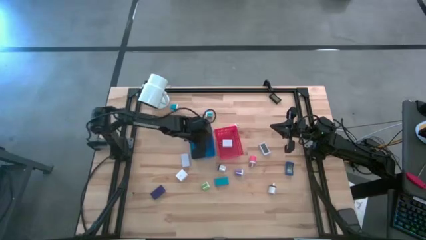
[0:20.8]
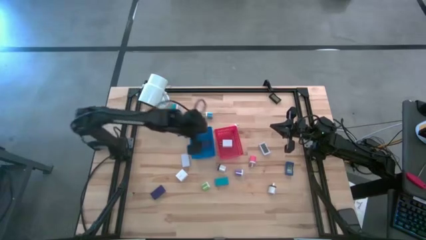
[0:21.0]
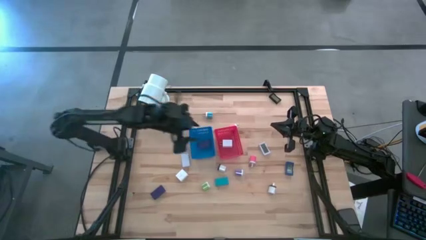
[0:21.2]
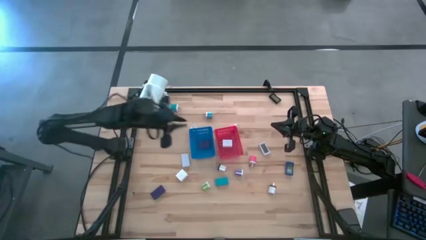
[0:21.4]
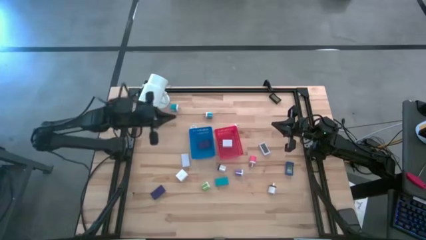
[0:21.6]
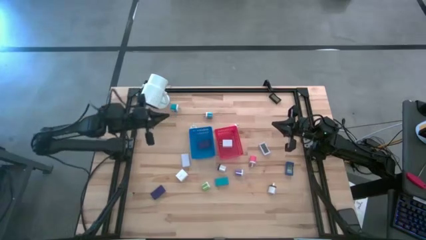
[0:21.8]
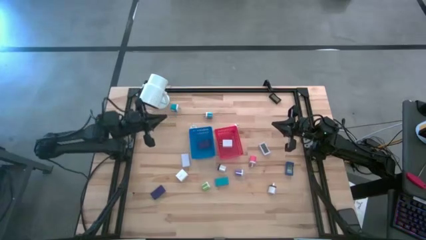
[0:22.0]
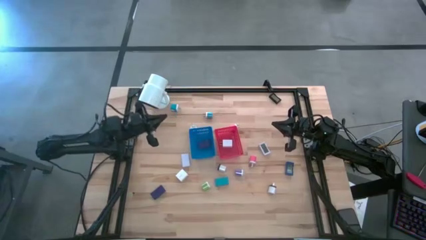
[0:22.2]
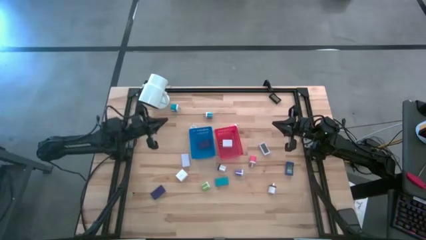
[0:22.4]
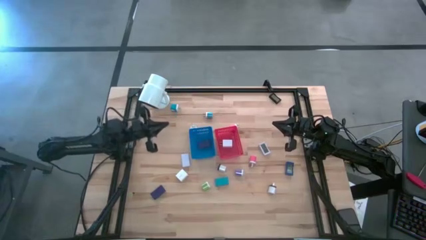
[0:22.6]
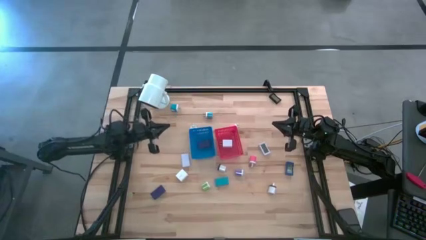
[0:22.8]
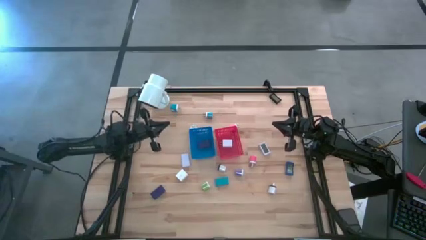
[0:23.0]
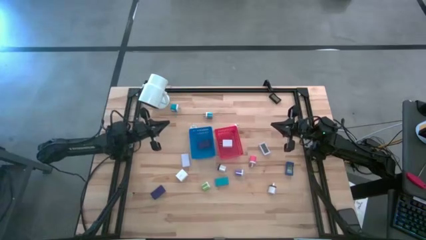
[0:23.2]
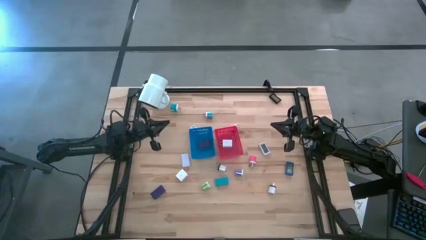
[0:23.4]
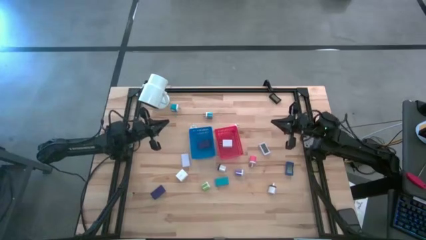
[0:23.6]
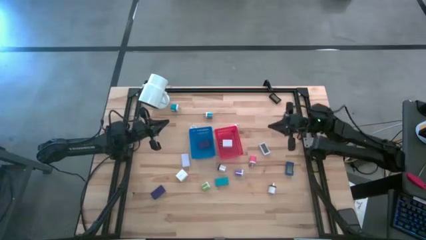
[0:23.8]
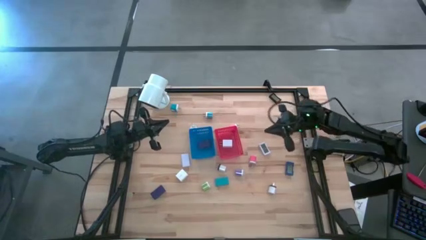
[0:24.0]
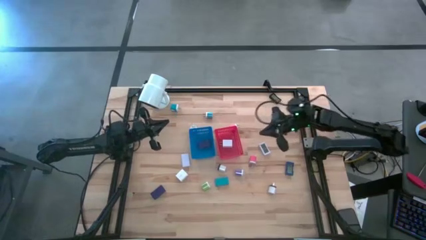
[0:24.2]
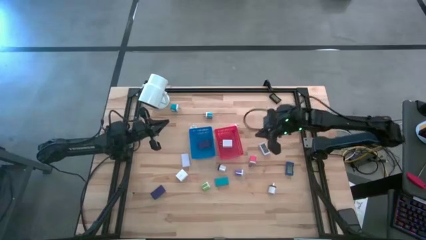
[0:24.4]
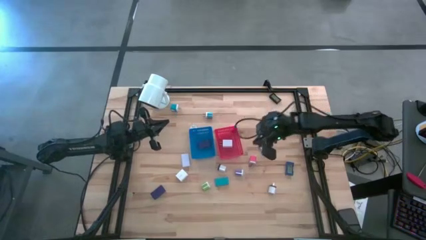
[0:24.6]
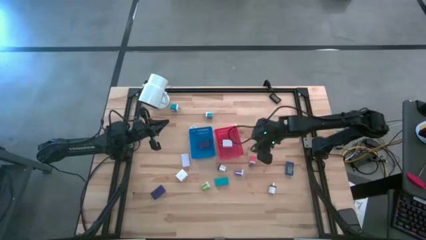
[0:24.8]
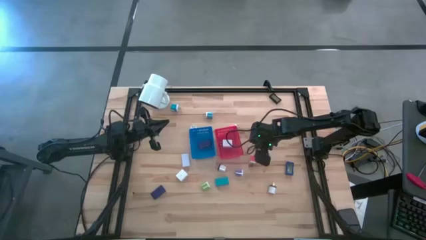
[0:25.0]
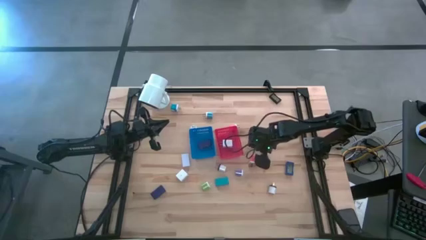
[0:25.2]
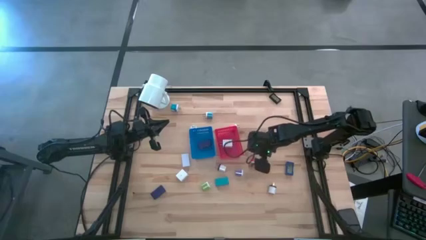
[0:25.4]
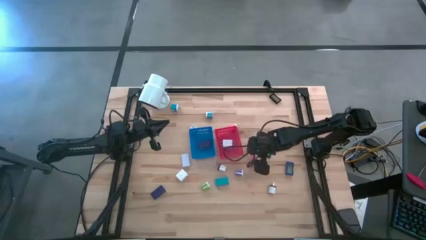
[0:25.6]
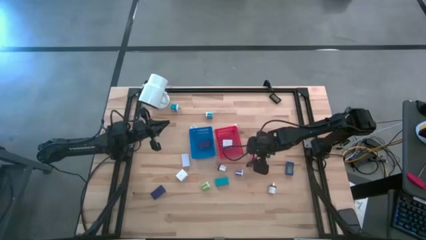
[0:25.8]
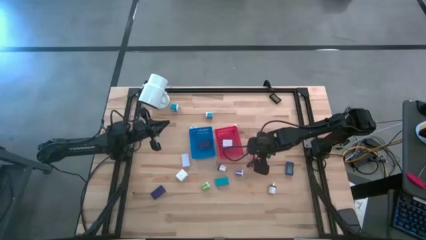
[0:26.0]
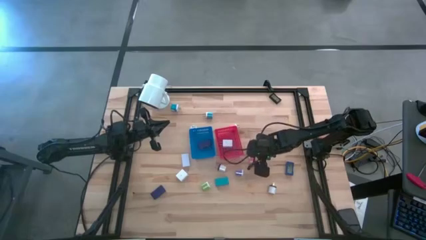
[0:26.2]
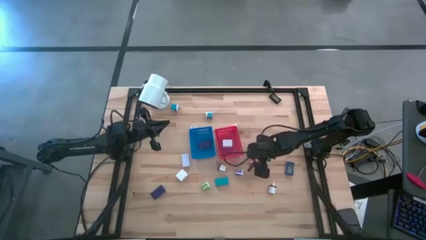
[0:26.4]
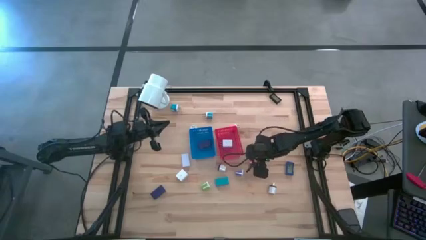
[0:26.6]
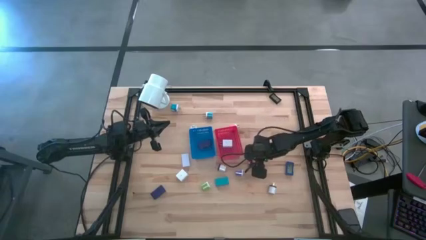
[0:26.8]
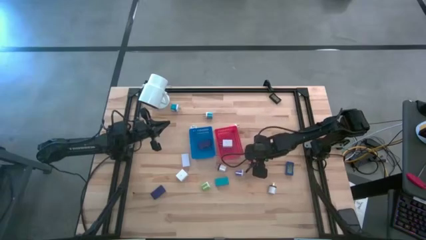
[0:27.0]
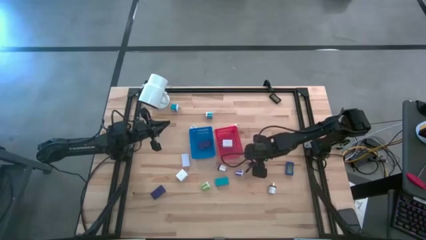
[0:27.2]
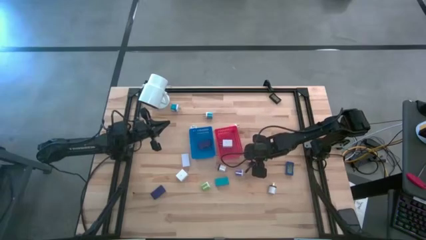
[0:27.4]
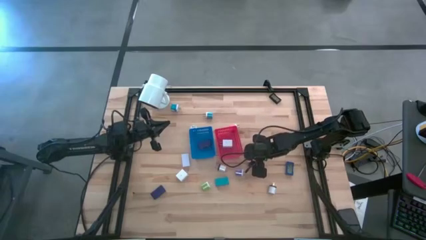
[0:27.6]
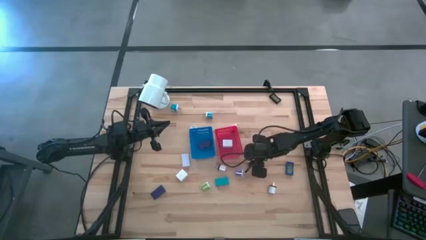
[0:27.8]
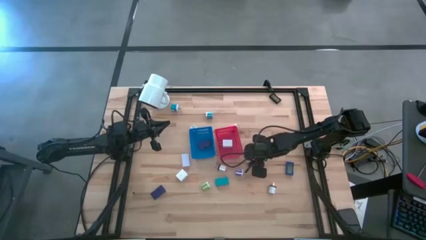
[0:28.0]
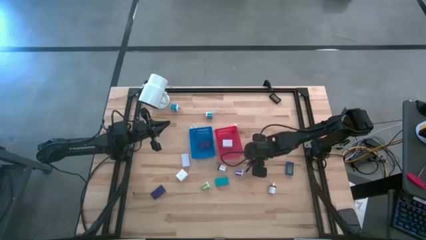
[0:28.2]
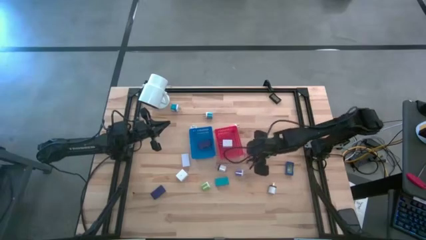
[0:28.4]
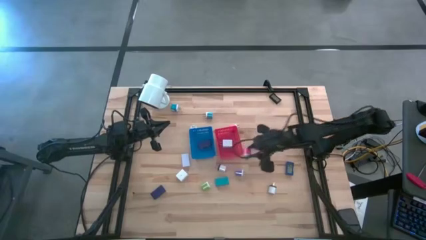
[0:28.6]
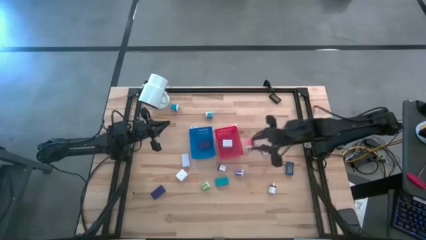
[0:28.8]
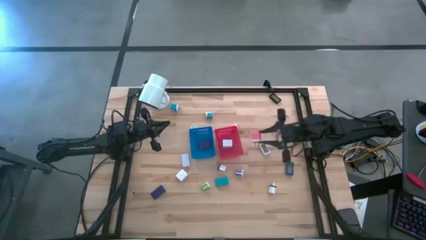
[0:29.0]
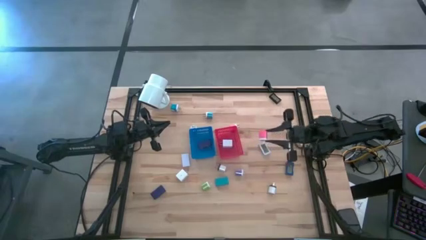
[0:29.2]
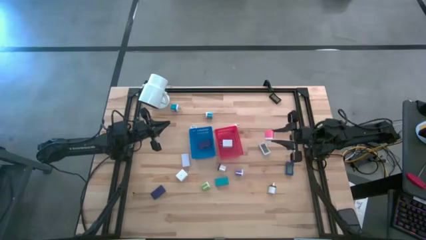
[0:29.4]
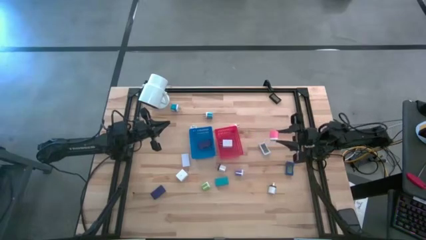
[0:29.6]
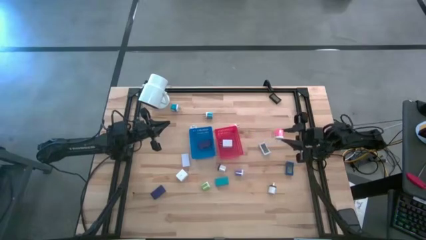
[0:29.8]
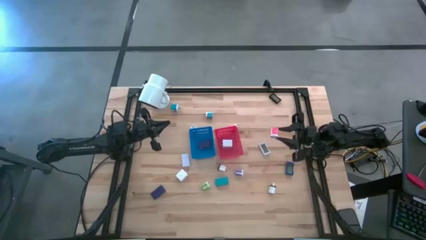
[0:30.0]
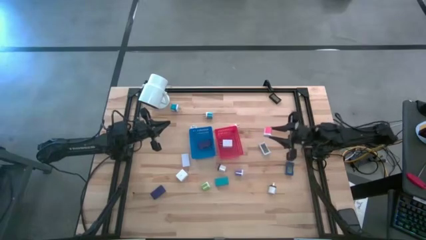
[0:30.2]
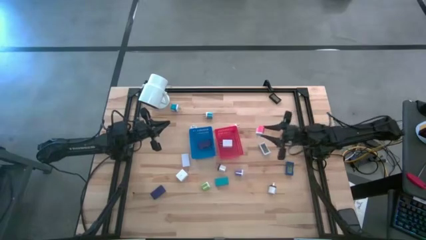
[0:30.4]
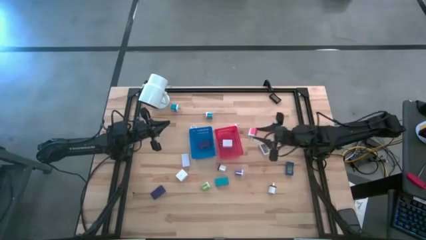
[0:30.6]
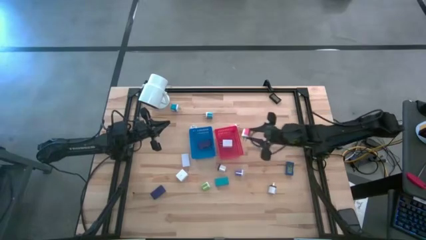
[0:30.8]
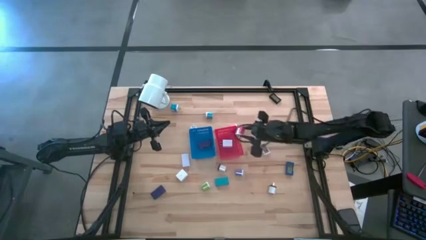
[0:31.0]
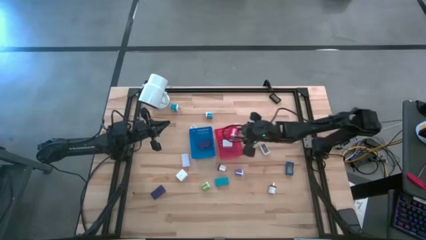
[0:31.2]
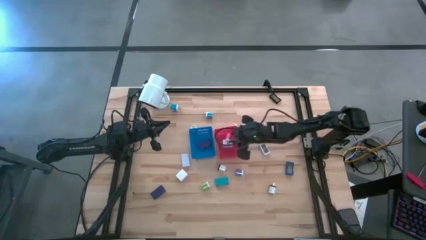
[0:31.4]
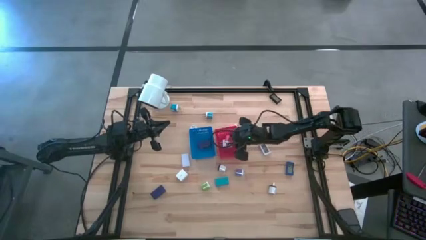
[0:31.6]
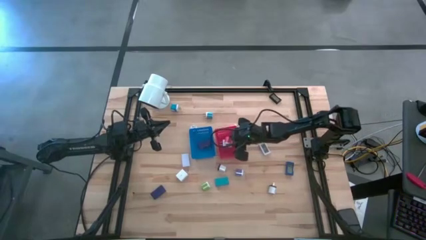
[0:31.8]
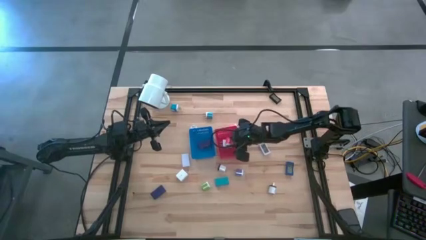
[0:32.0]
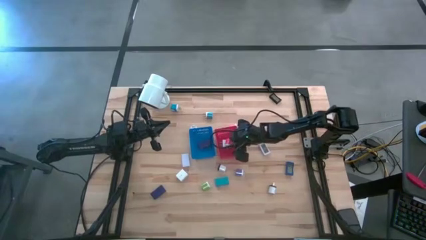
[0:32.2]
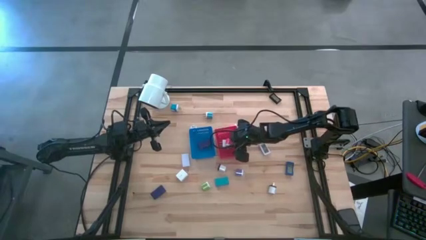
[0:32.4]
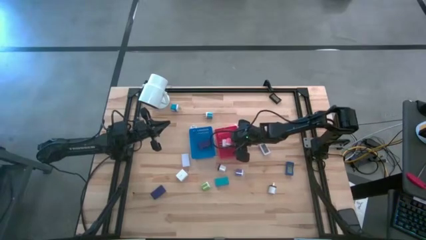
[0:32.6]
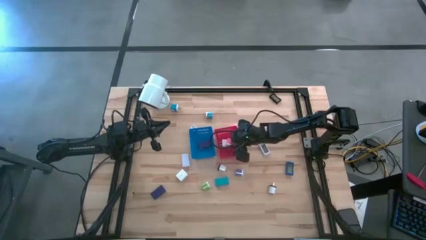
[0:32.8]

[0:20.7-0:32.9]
Task: Pick & Place Office items
Put the bottom pink charger adapter into the red bin
